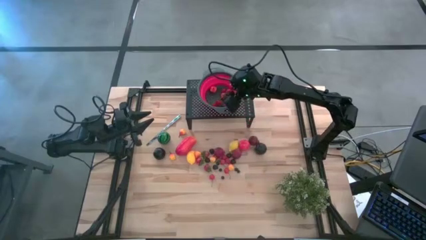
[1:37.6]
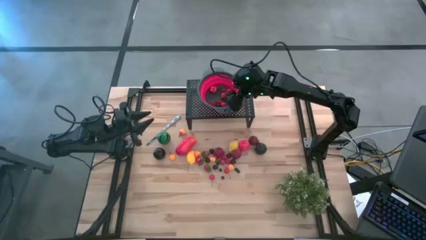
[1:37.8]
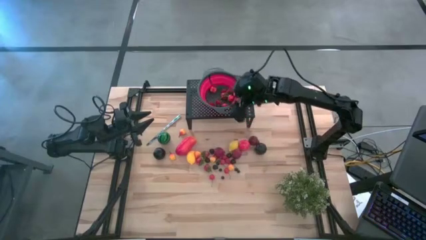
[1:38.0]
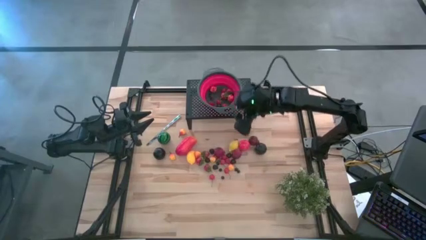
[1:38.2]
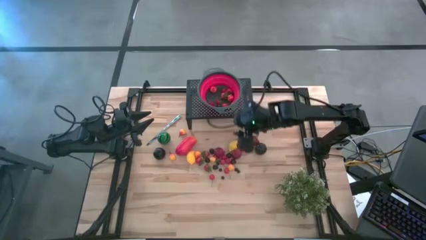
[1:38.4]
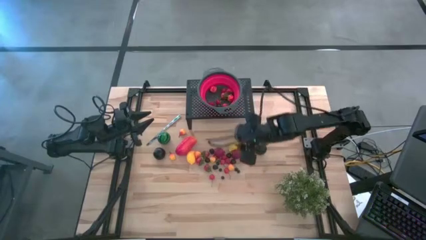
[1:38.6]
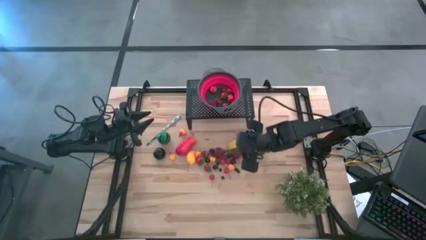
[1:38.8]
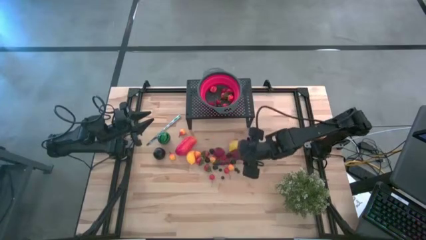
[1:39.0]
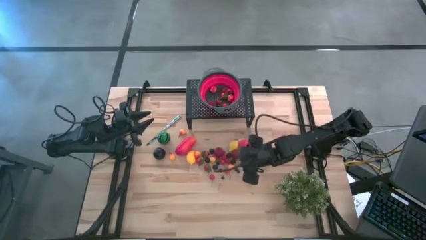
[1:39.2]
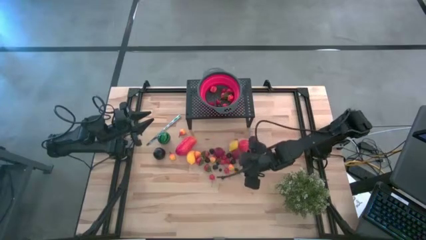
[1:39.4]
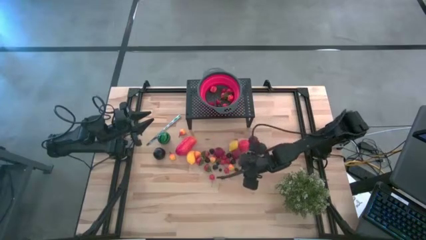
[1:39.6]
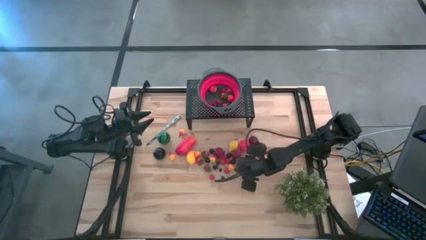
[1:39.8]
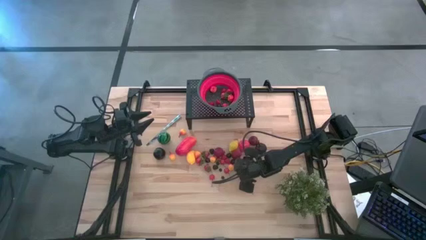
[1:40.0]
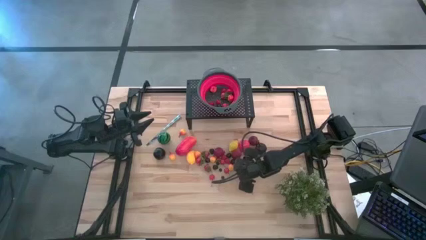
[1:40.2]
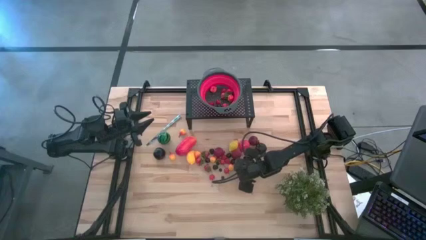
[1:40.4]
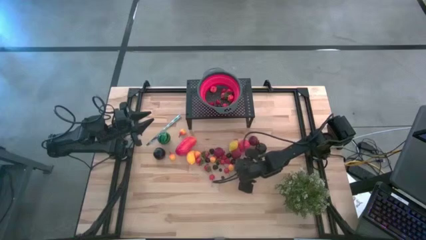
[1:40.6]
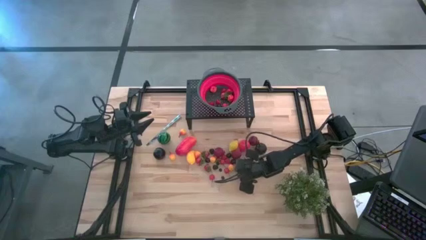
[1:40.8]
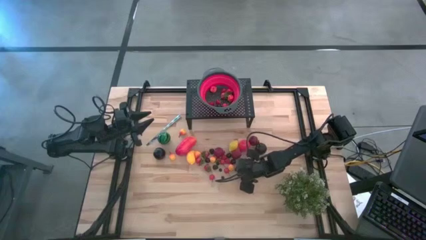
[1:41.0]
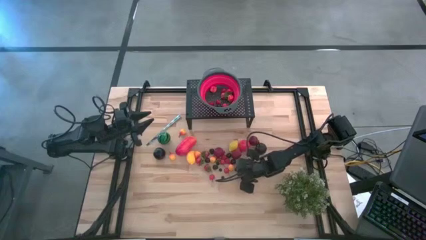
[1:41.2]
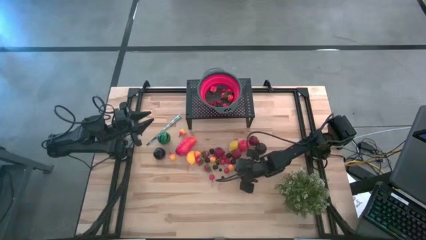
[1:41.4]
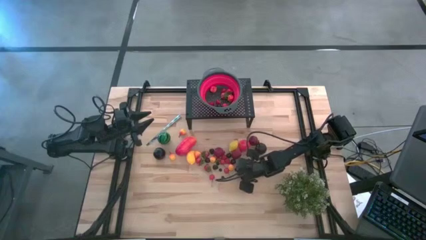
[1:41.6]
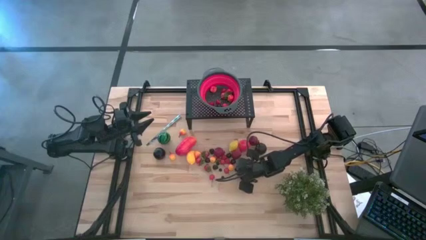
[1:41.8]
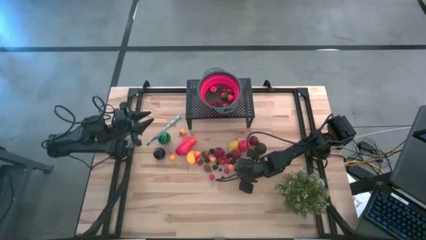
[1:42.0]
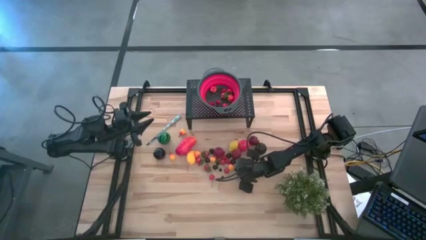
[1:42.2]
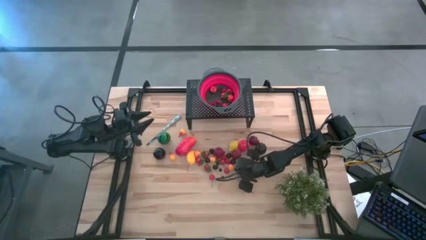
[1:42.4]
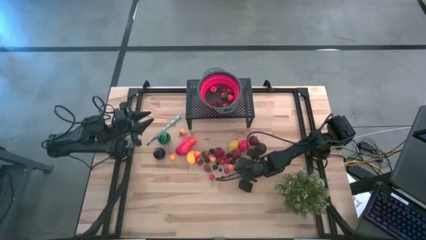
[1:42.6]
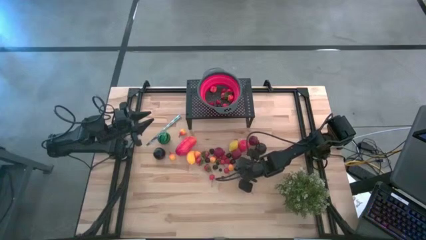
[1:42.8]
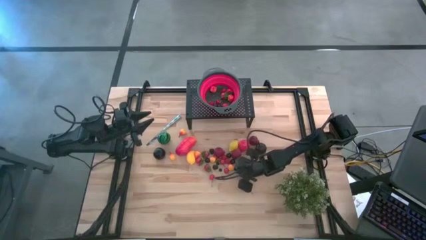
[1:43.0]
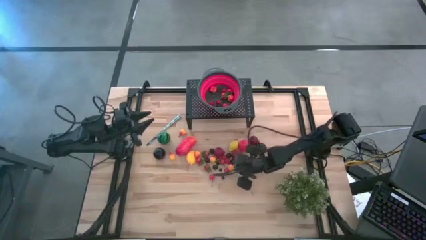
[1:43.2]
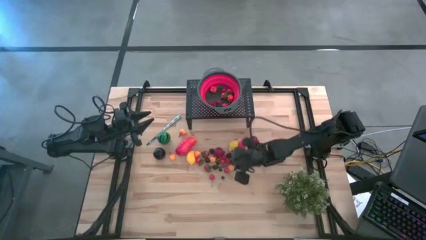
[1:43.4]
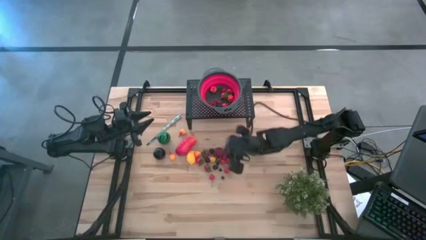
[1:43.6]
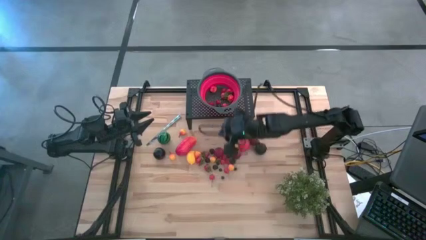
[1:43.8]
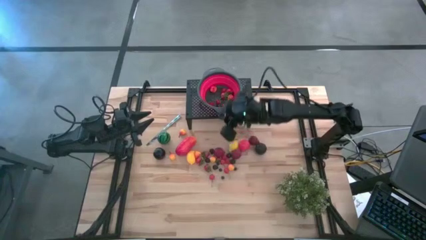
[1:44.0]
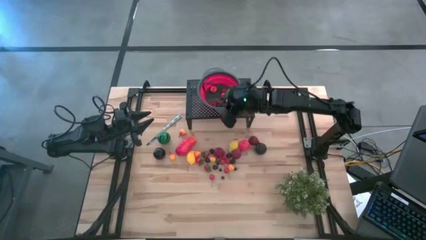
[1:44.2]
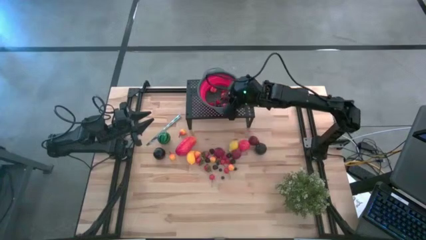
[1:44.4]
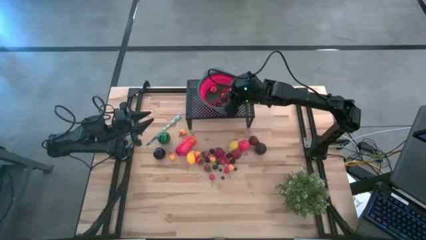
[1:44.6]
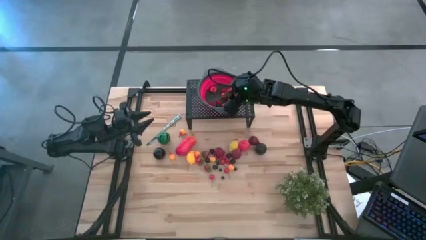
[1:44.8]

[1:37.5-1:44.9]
Task: Pick & Place Fruit
Put the blueberry in the red colander on the shelf

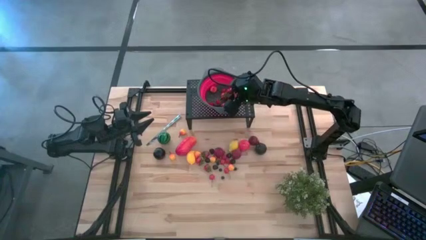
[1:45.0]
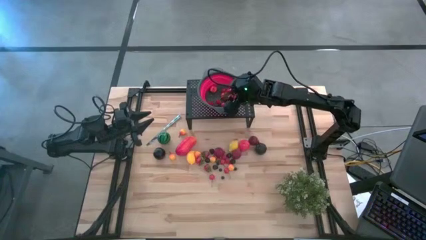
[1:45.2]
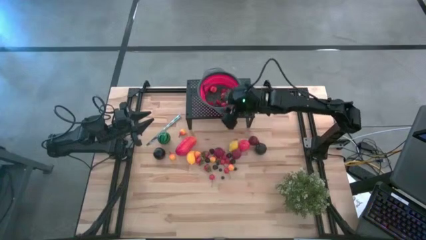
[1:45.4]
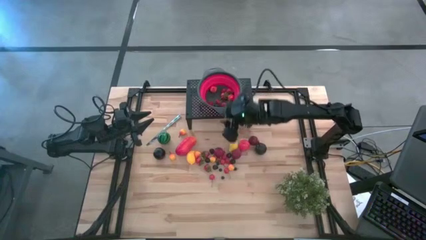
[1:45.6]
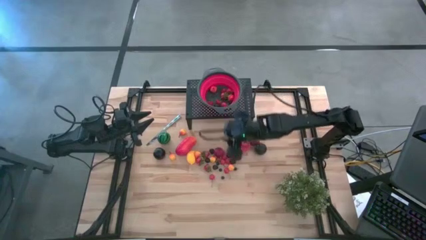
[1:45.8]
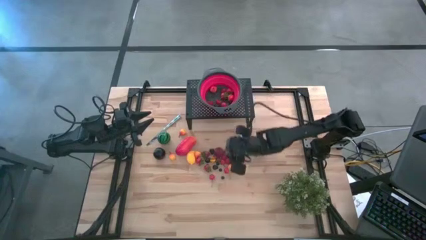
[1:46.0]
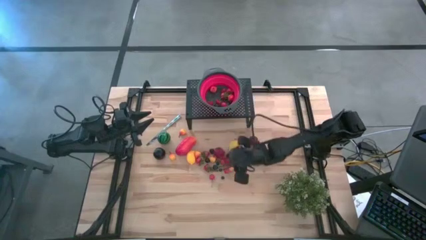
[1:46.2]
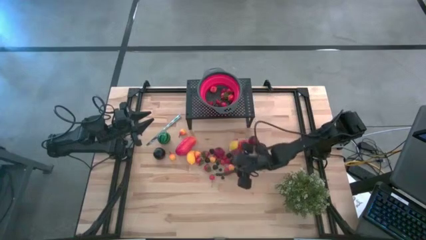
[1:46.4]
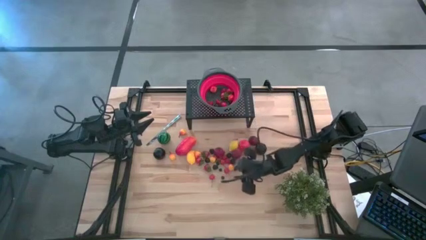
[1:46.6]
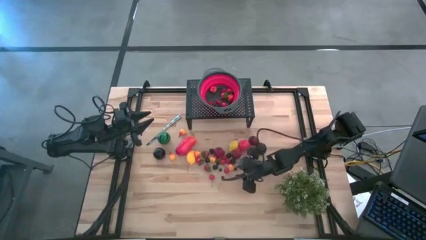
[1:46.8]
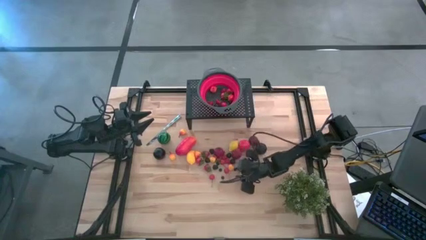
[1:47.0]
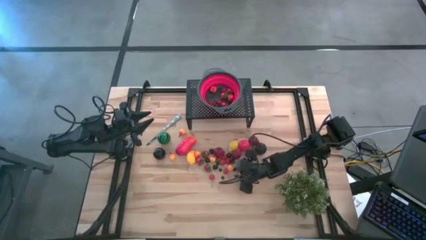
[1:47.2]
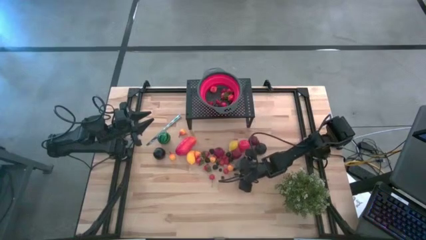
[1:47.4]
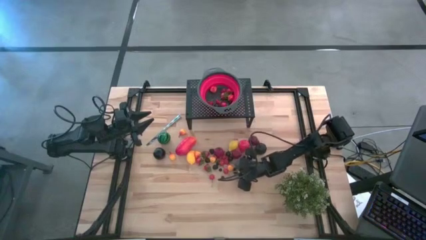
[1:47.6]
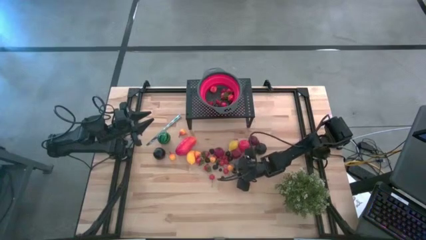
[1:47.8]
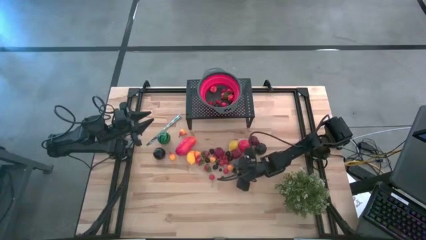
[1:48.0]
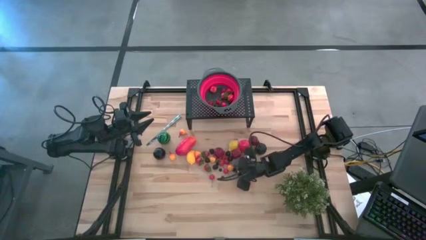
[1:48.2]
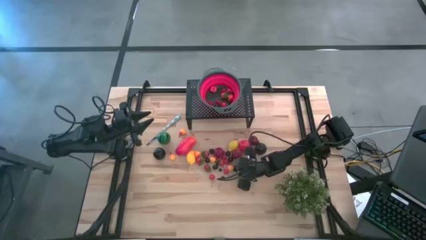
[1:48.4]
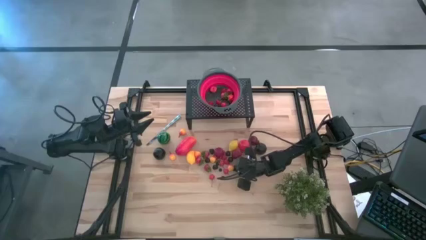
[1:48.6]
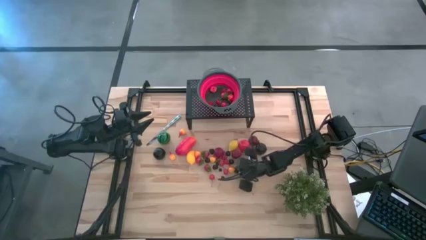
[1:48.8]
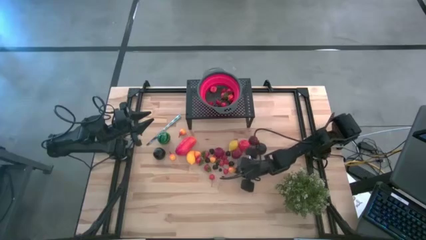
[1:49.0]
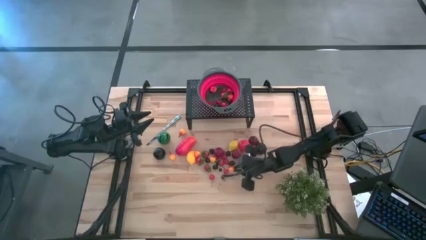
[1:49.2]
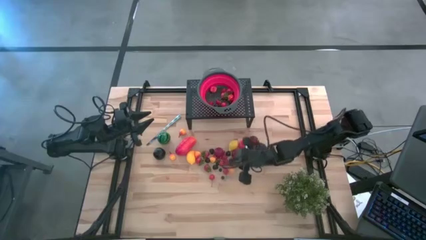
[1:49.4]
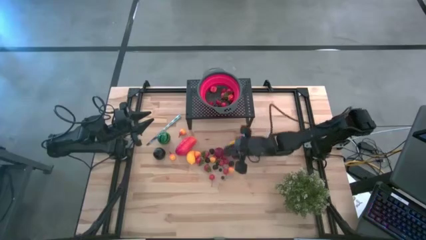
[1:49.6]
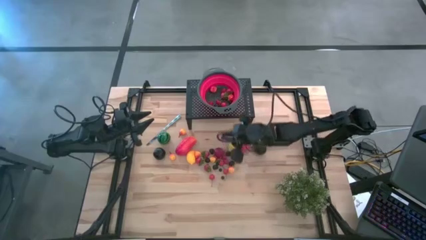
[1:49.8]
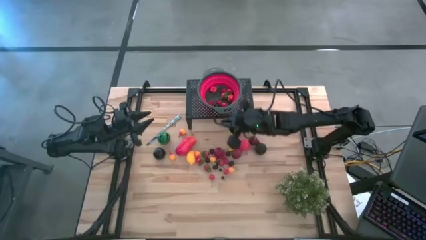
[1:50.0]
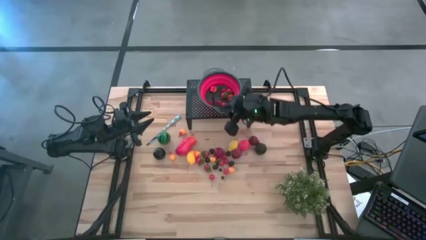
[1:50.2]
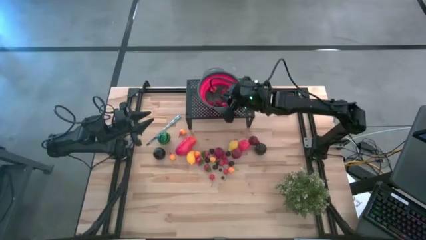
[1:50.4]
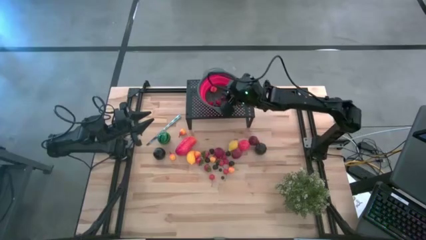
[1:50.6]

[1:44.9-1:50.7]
Put the blueberry in the red colander on the shelf

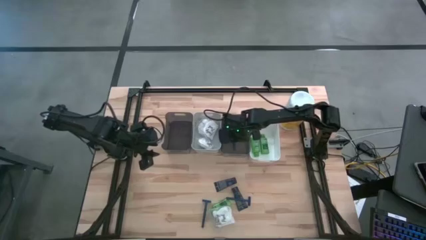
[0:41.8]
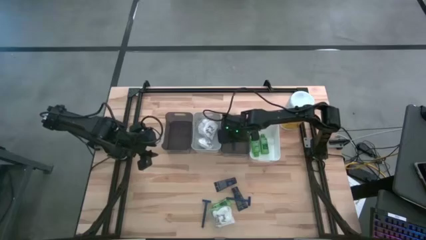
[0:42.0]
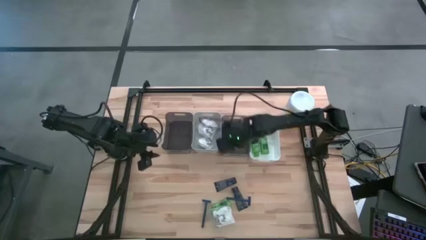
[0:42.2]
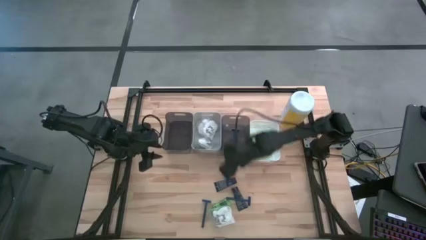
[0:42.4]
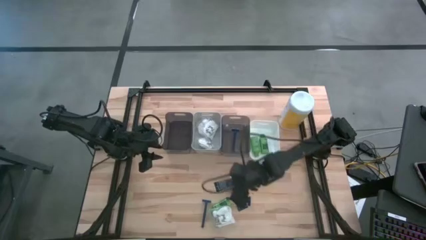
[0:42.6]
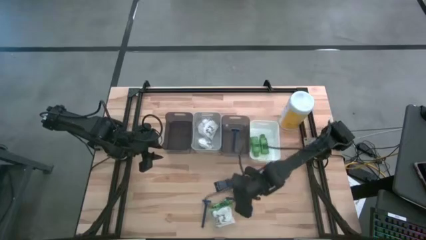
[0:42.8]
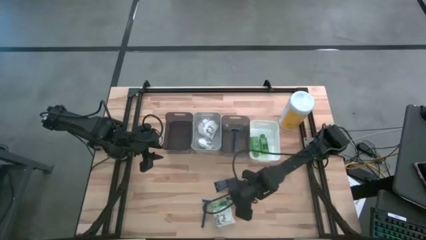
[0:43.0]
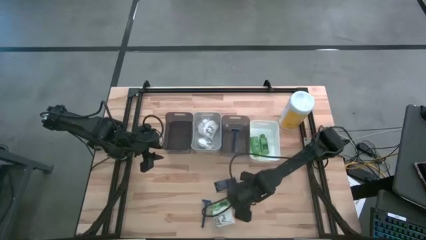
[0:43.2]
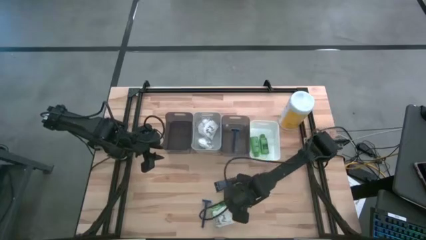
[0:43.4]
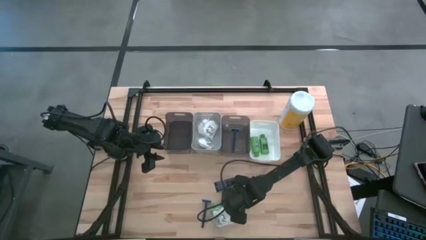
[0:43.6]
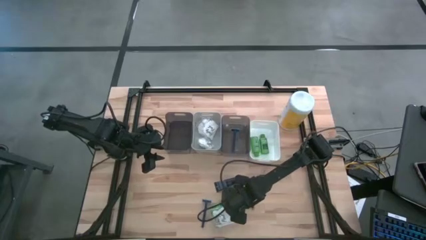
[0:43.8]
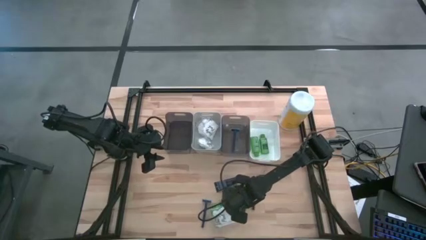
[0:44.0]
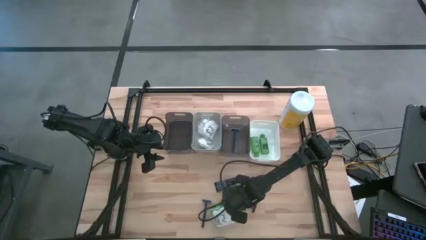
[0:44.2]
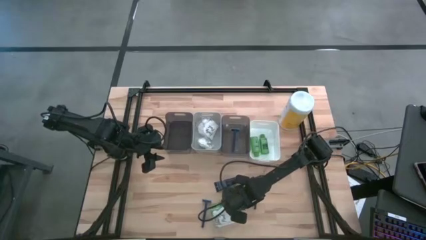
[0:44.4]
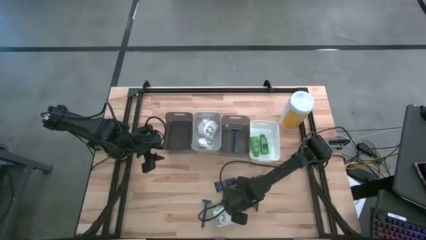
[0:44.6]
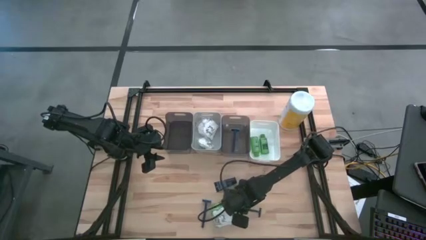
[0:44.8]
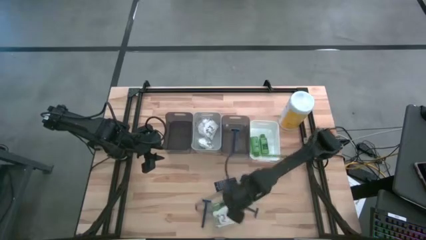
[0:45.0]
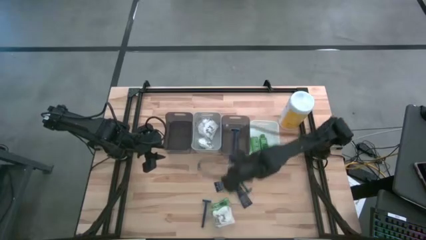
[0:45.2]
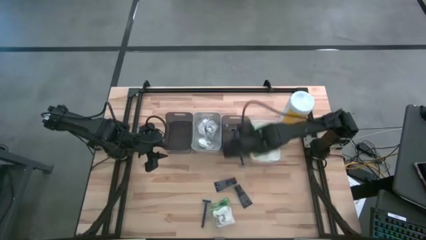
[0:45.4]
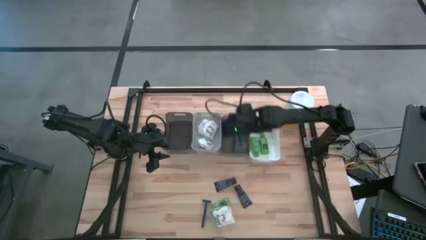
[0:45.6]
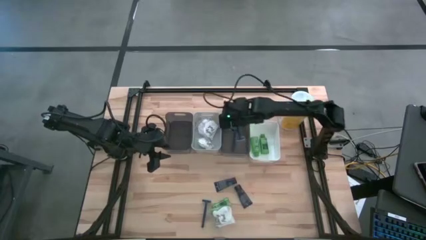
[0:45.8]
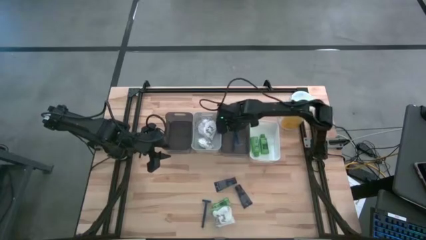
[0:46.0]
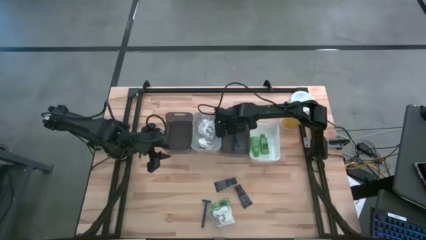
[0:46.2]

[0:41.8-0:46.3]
Task: Pick & Place Travel size toiletries
Put the blue razor into the right black bin
